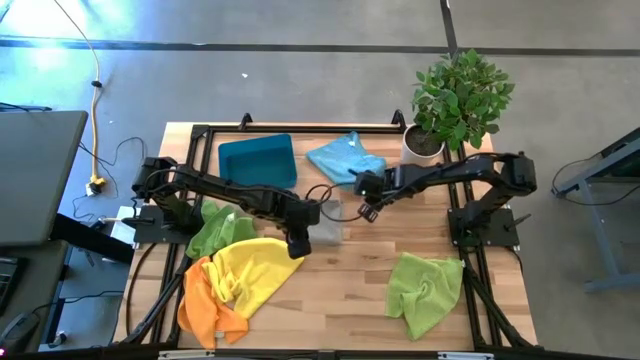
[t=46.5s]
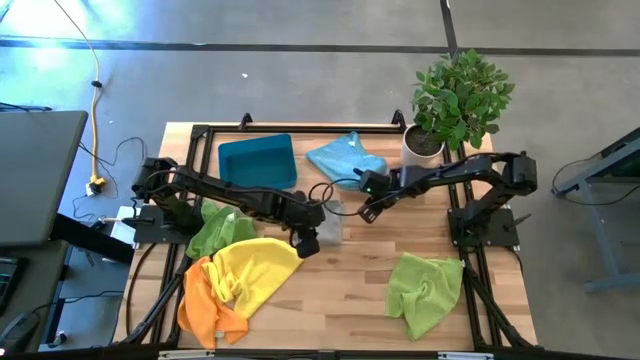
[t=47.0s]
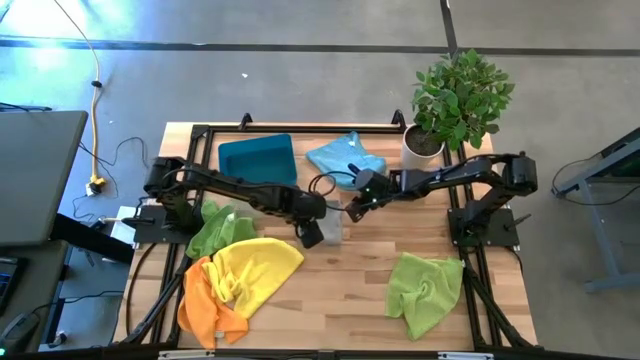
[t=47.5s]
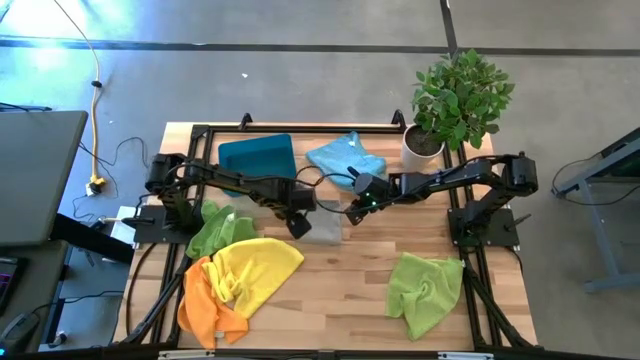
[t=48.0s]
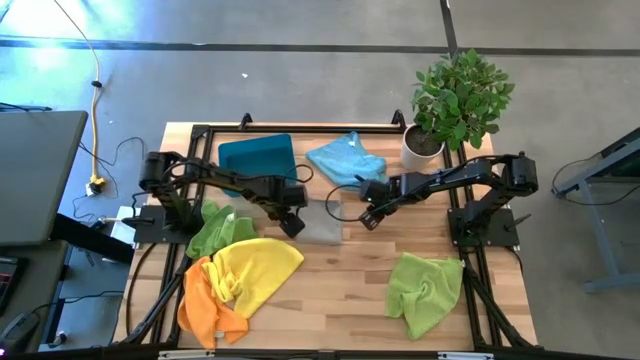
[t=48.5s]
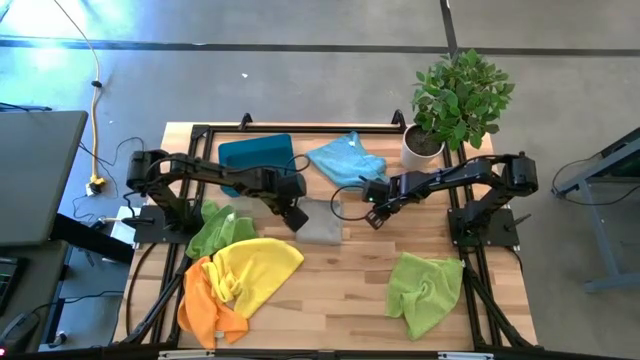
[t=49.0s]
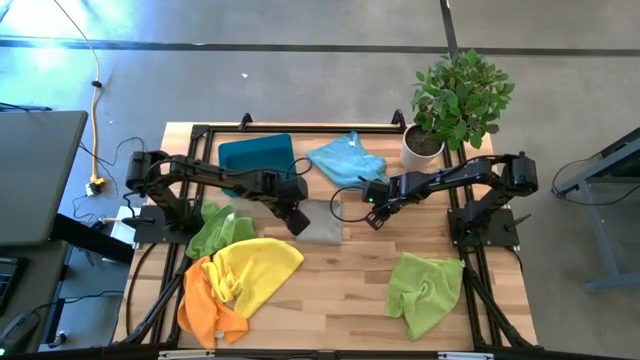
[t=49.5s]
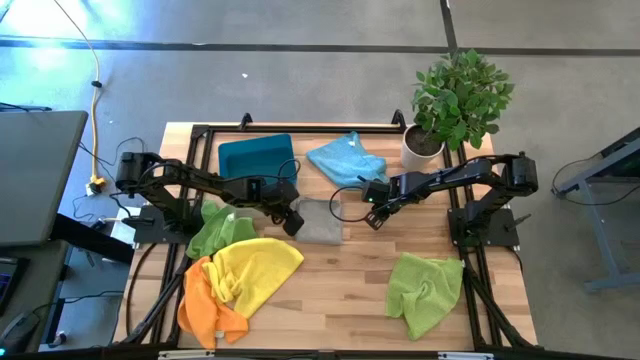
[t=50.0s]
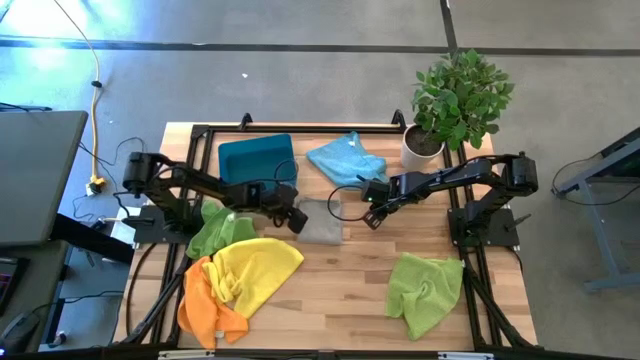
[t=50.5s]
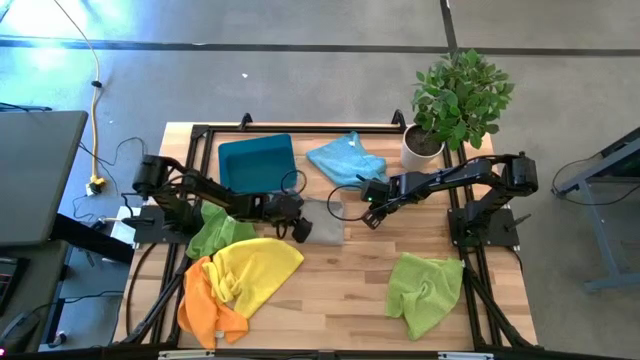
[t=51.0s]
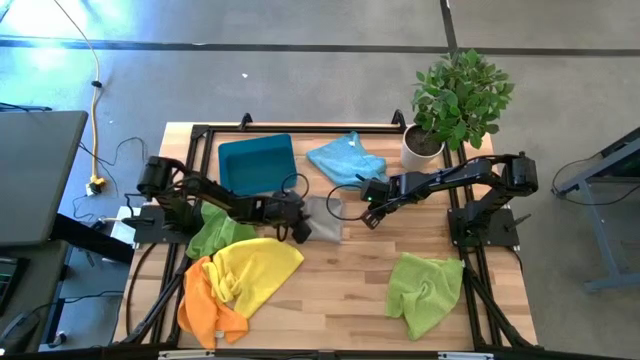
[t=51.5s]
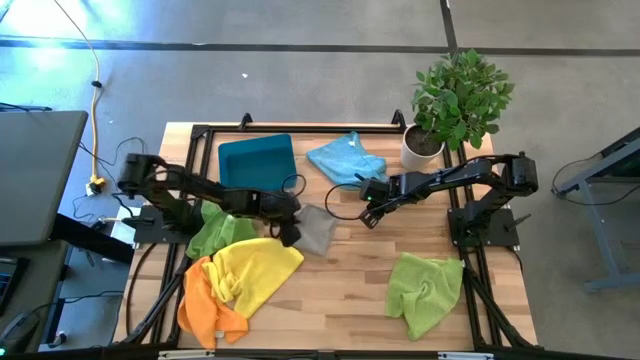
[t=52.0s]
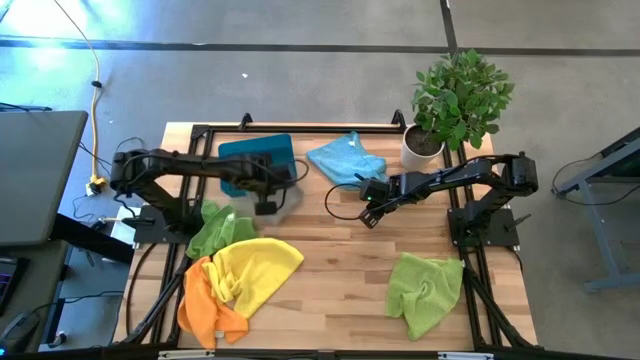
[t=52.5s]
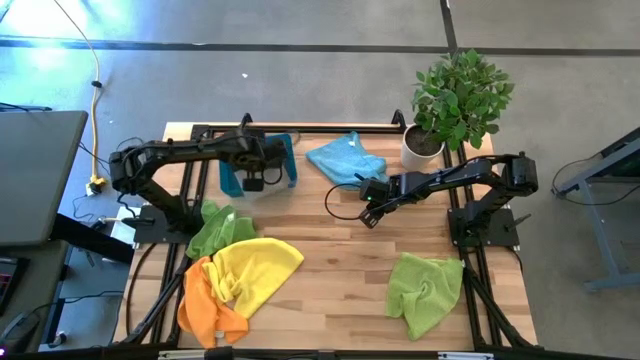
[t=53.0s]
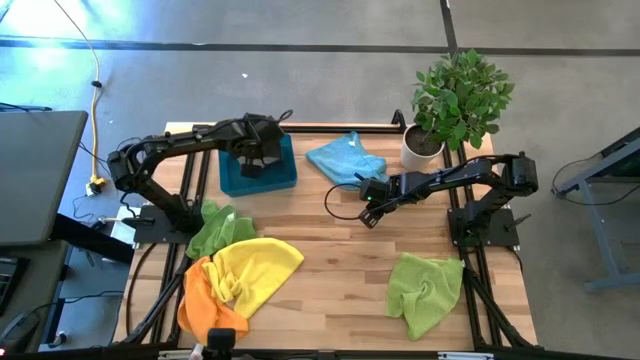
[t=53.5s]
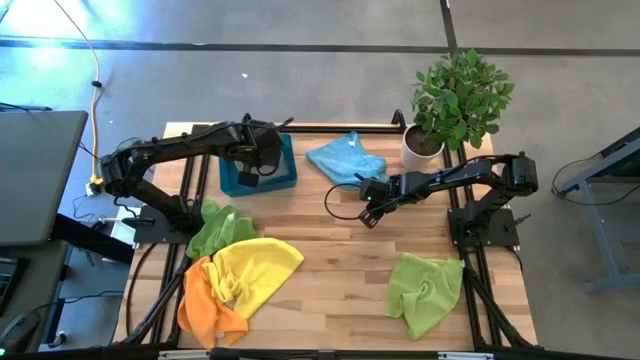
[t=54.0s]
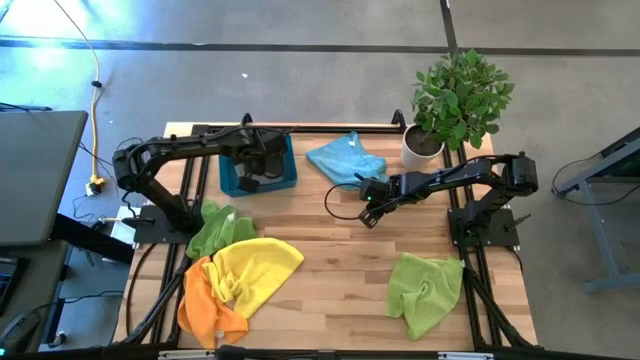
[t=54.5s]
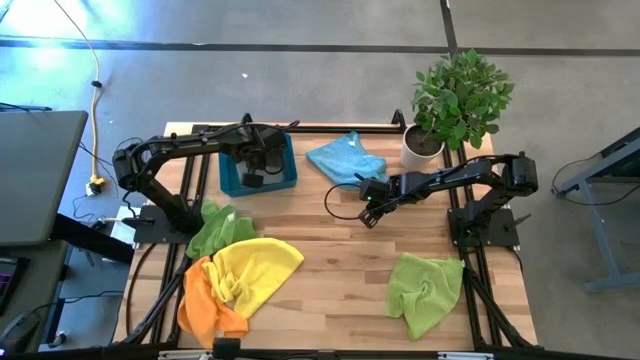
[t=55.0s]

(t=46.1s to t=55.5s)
Task: Fold microfiber towels
Put the folded gray microfiber cloth into the bin

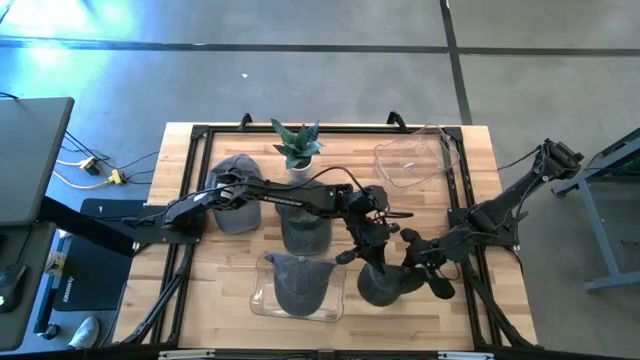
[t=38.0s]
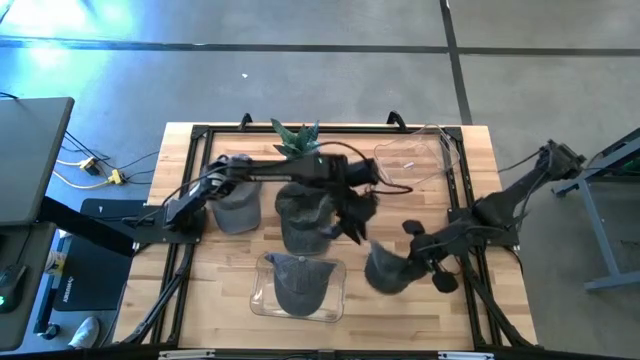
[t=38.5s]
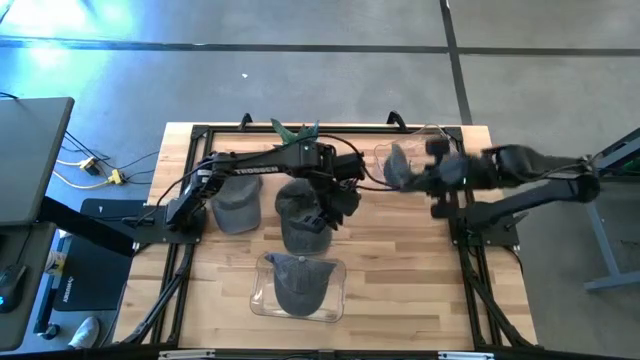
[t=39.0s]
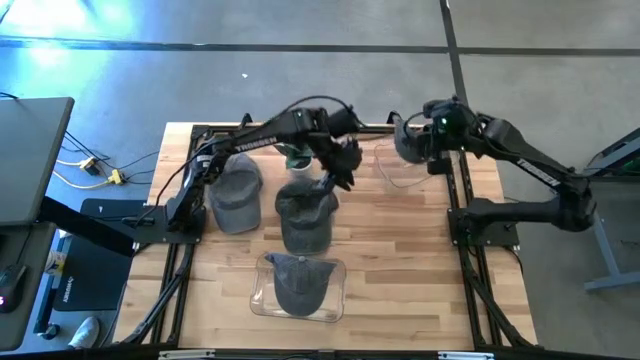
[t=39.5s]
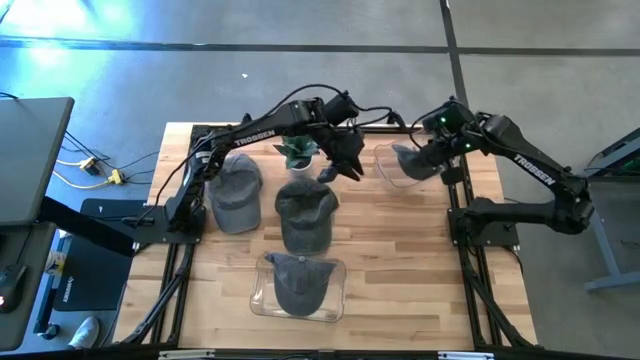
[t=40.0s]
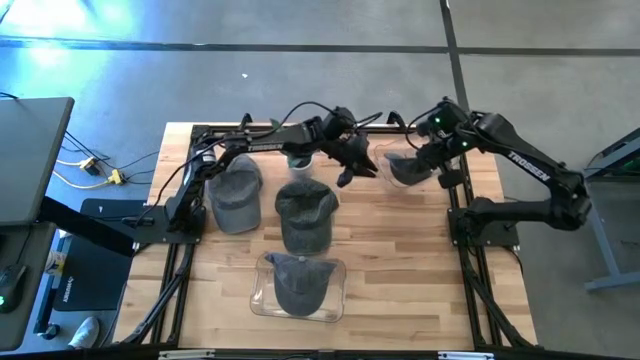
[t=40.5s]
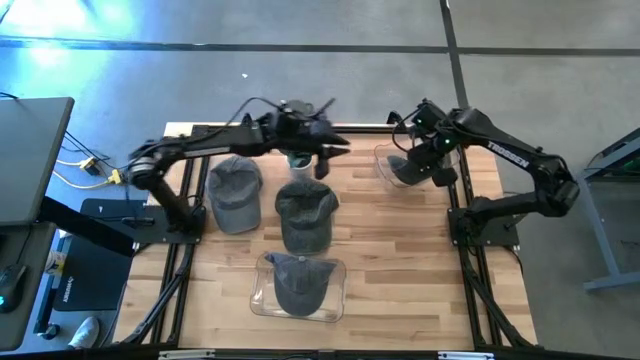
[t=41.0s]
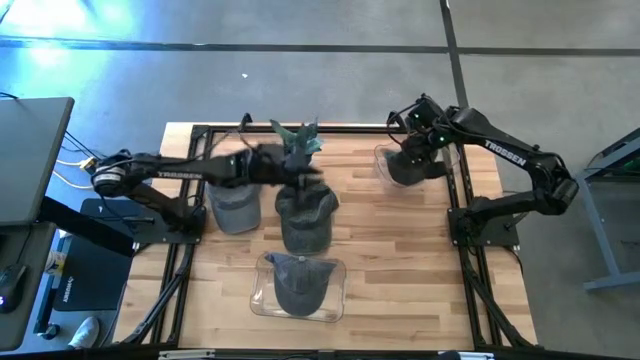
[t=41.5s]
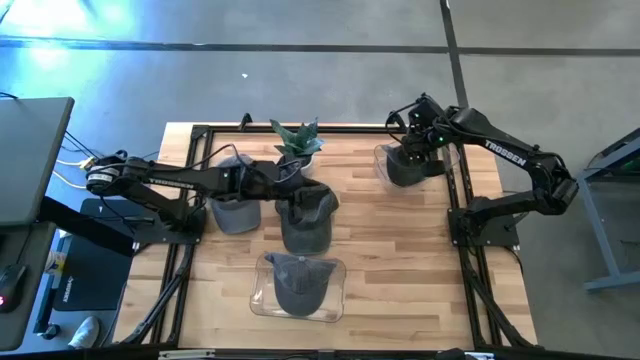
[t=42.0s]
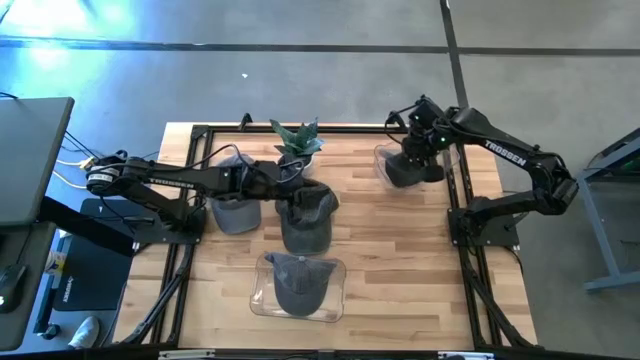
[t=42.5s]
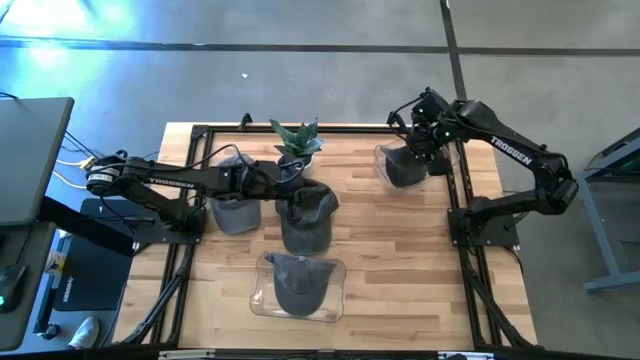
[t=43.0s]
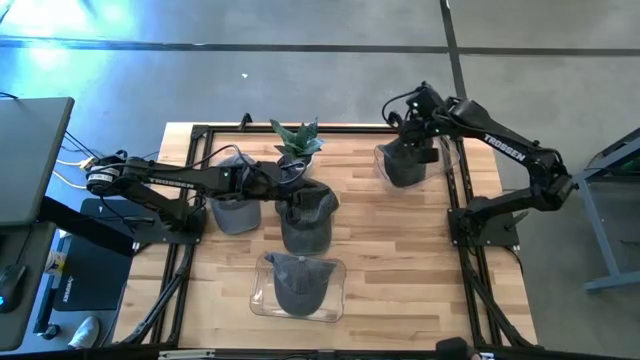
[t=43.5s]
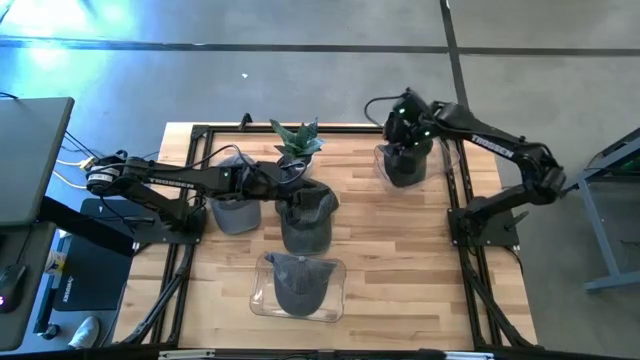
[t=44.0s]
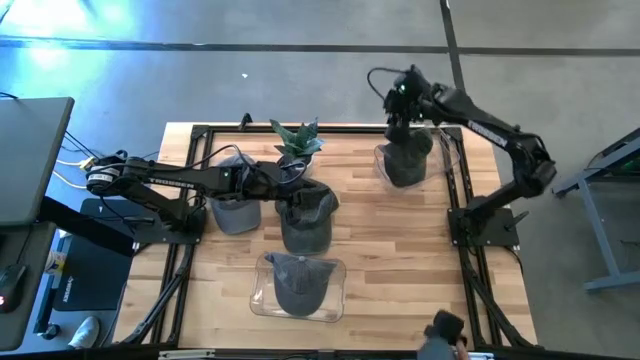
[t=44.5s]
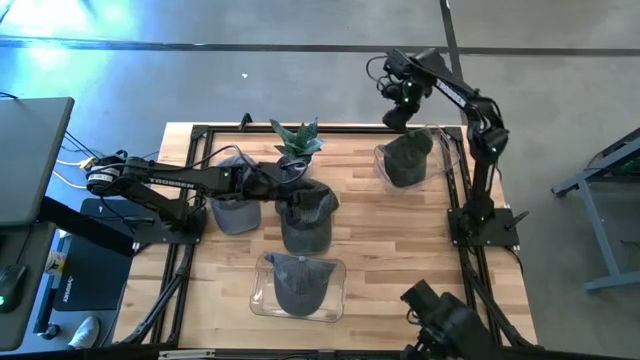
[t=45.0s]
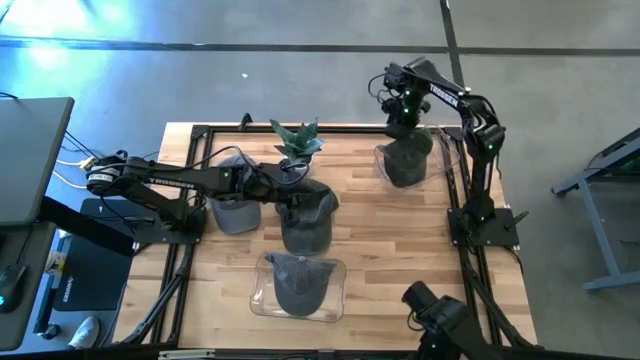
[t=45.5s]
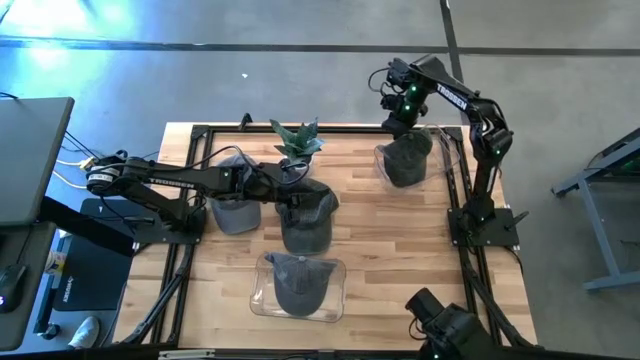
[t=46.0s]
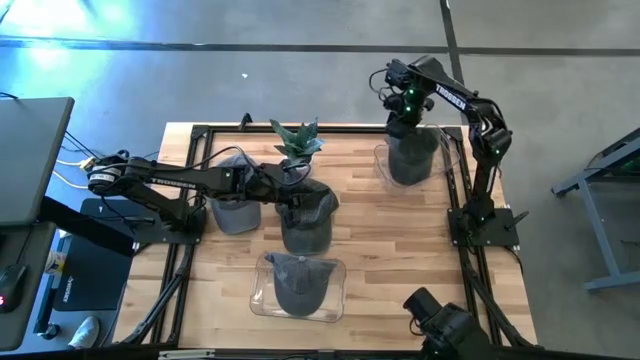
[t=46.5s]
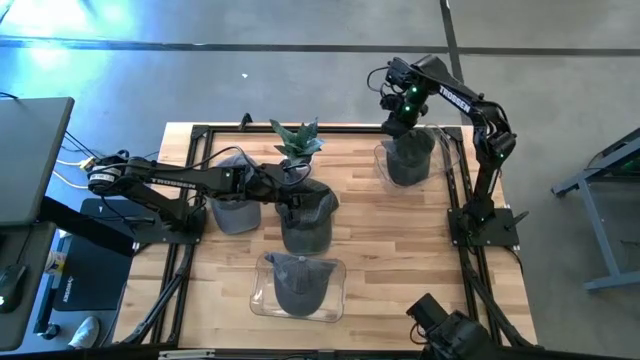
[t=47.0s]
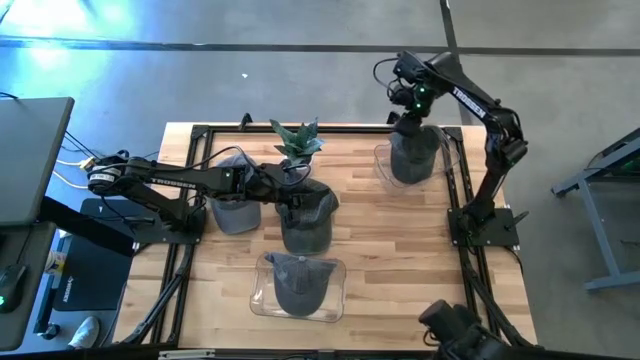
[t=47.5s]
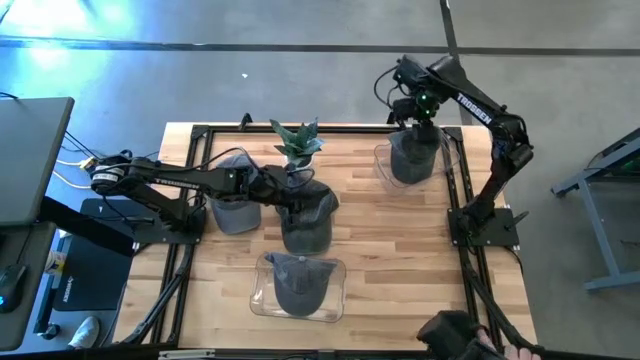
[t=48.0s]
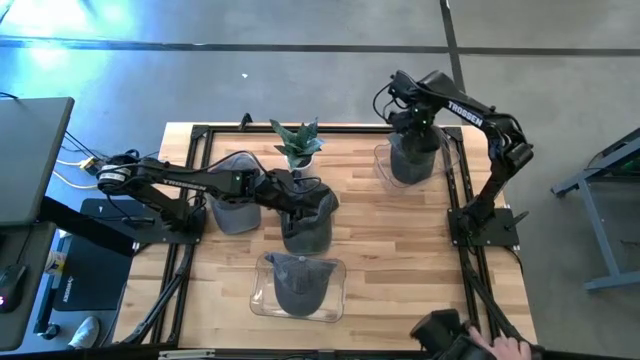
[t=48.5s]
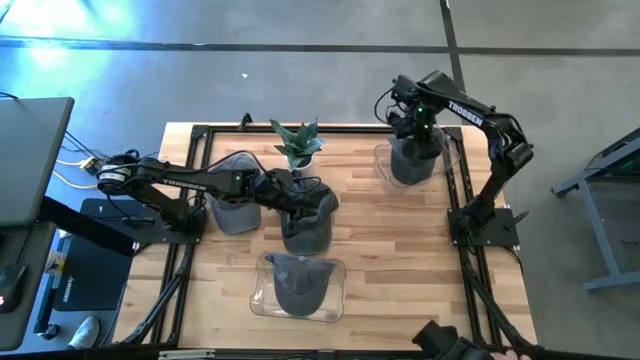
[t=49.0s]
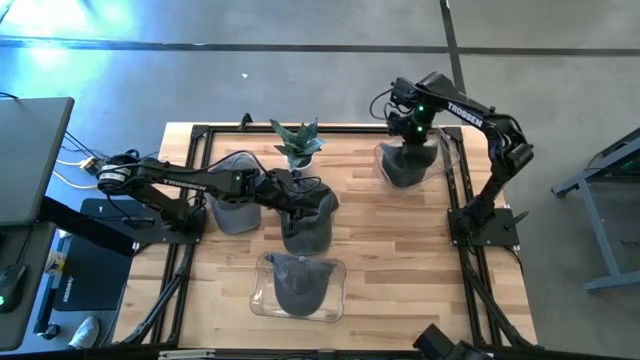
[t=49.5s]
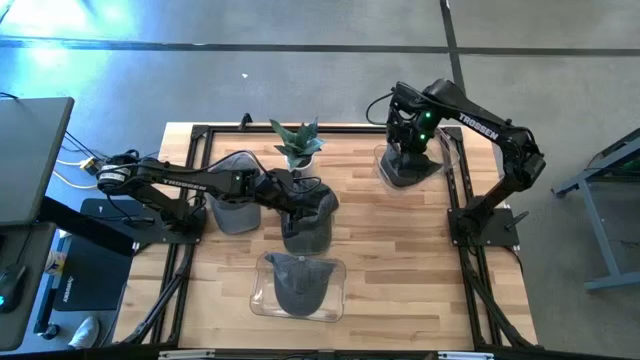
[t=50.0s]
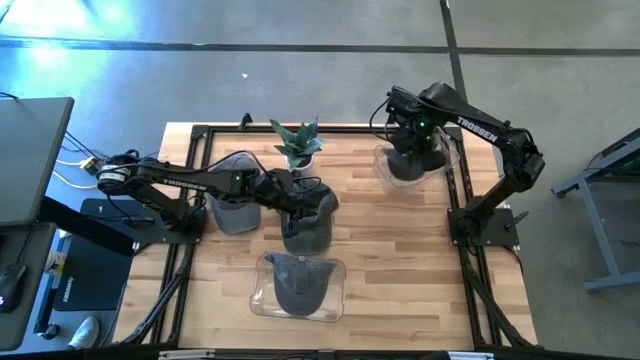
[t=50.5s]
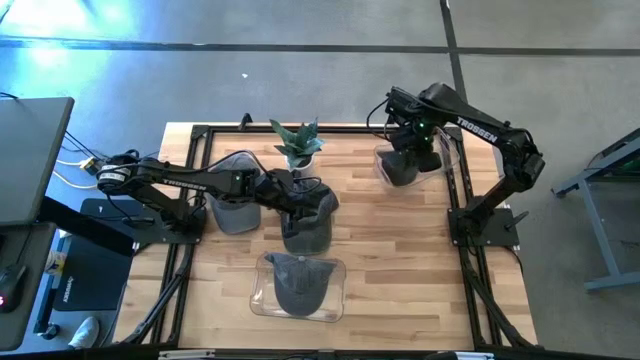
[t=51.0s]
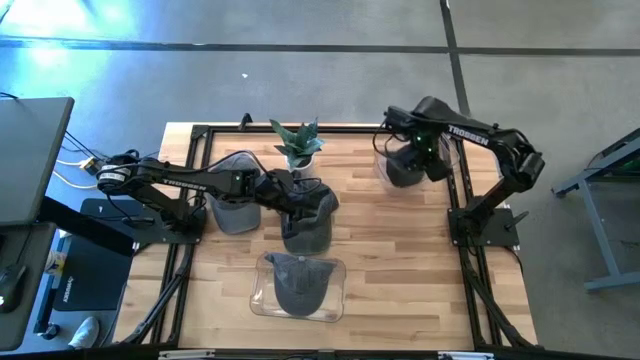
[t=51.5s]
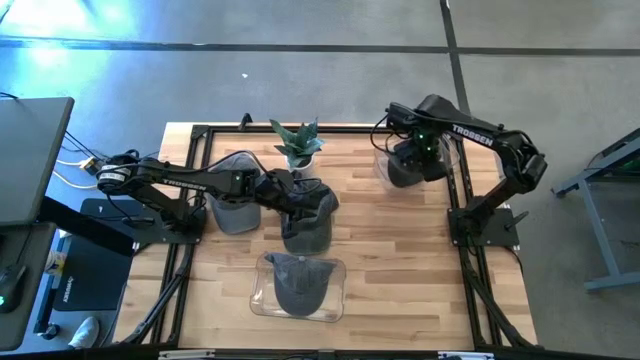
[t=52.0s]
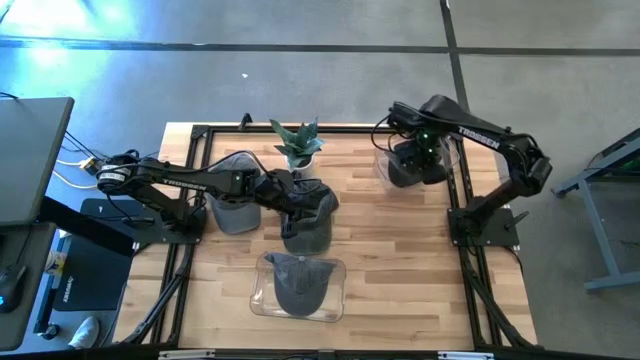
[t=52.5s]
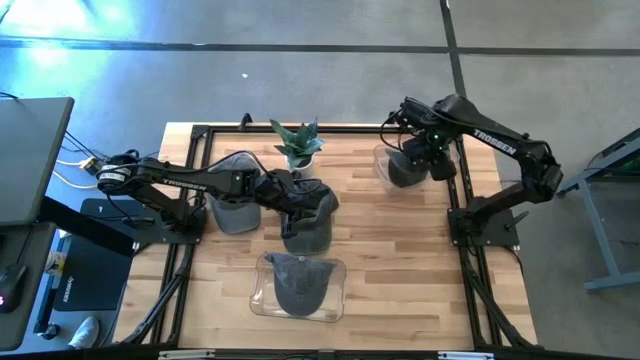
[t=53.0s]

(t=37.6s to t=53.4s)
Task: Pick & Place hat
Put the right dark green cap into the top transparent bin
